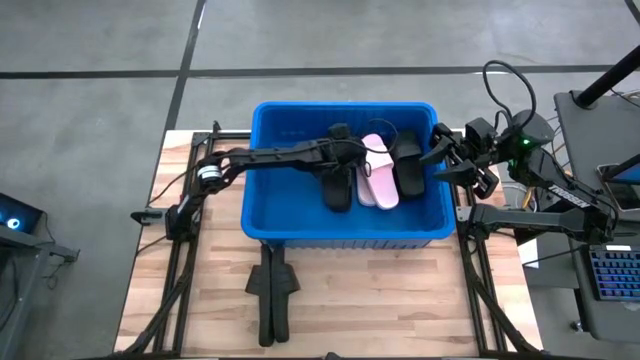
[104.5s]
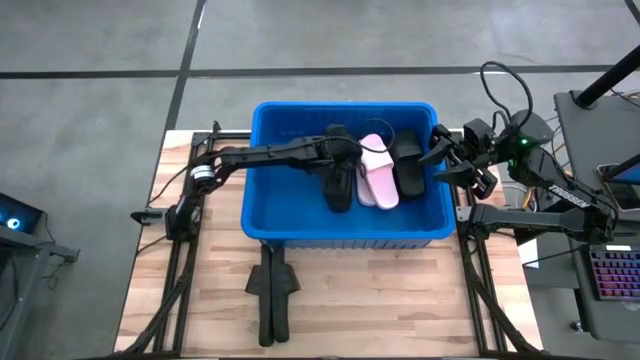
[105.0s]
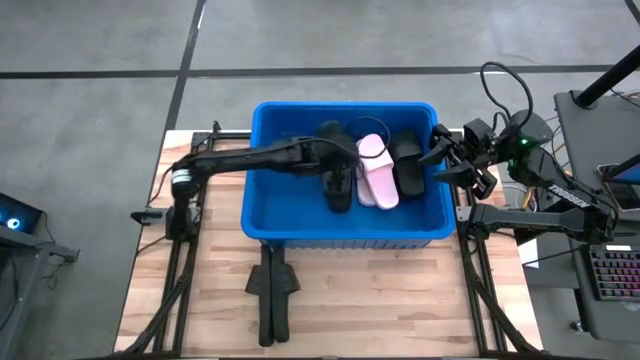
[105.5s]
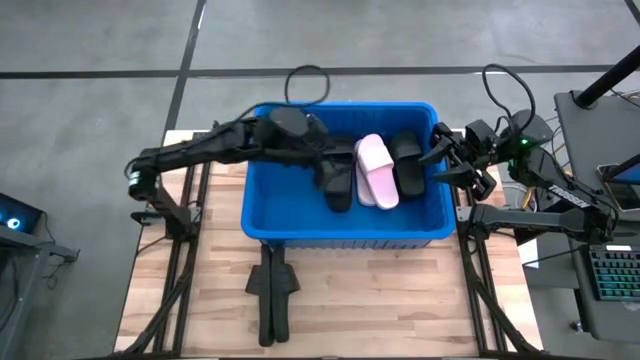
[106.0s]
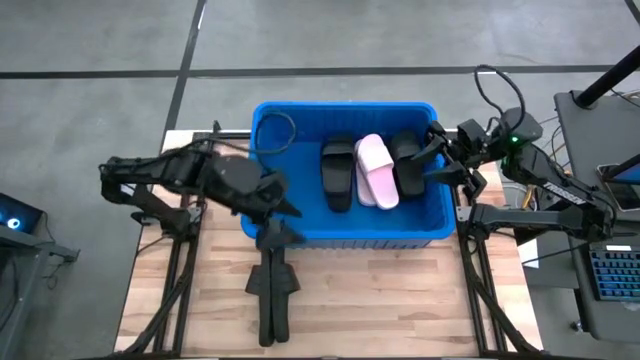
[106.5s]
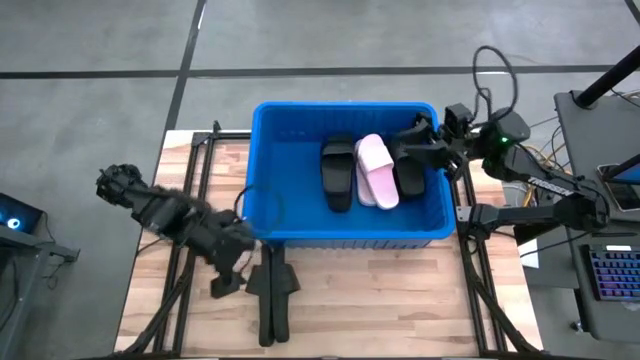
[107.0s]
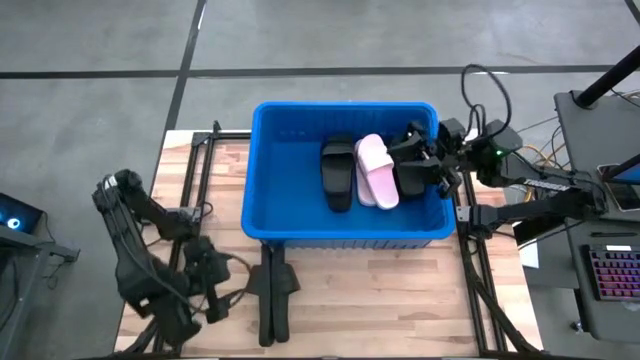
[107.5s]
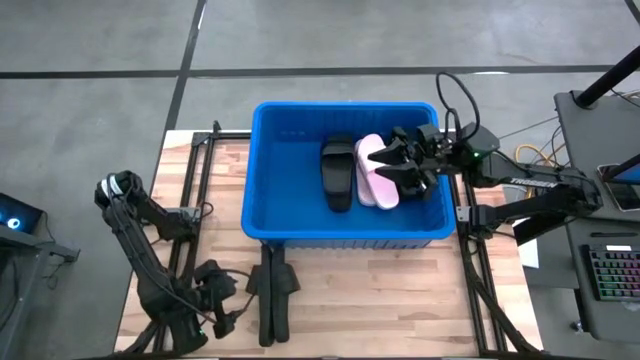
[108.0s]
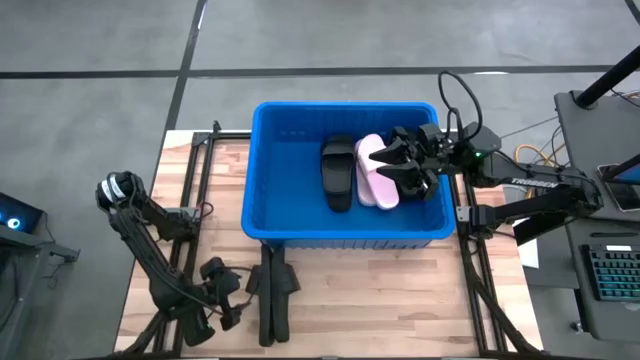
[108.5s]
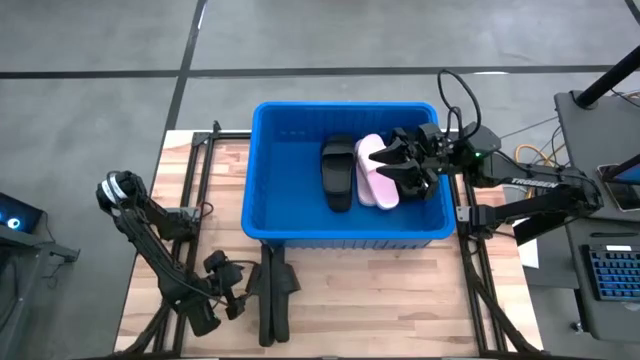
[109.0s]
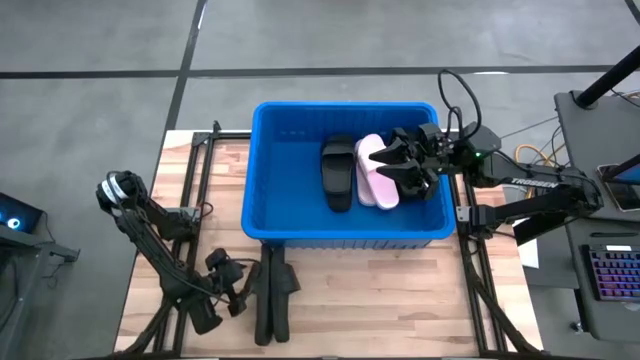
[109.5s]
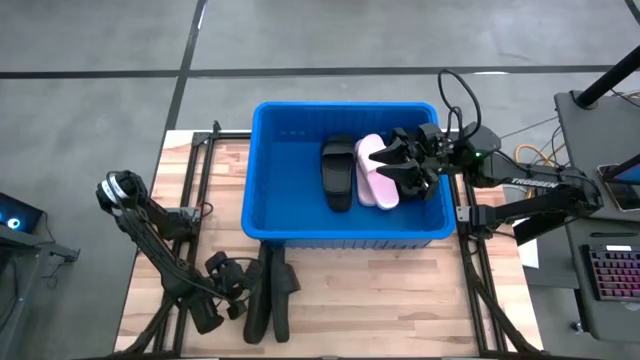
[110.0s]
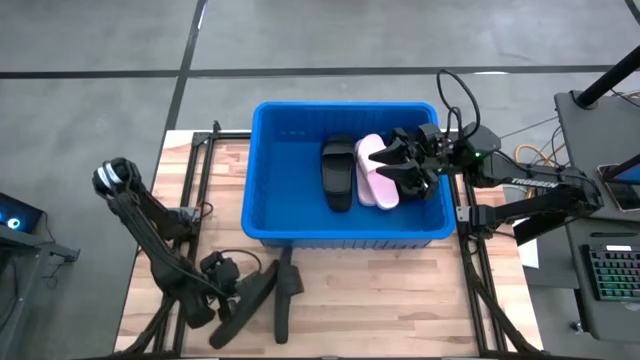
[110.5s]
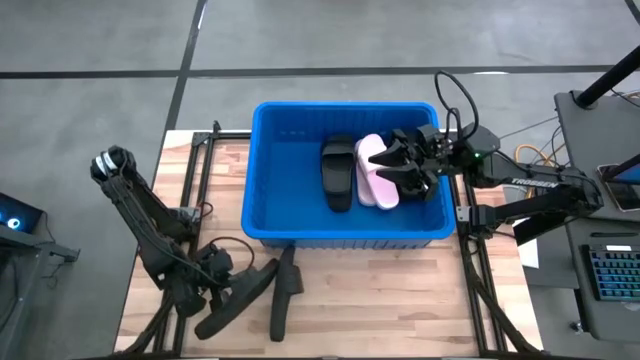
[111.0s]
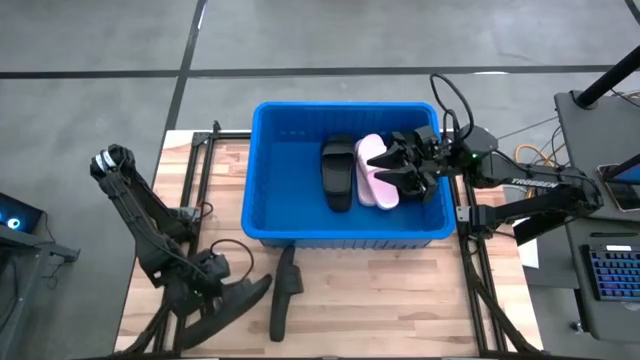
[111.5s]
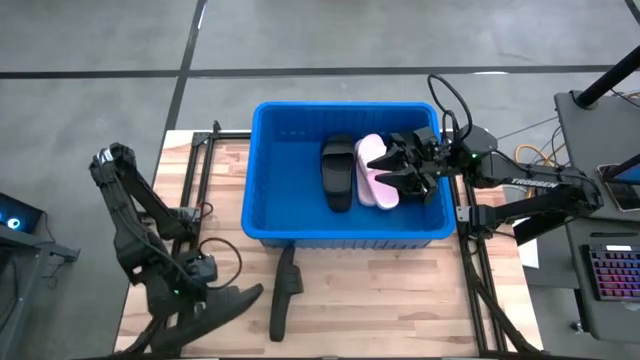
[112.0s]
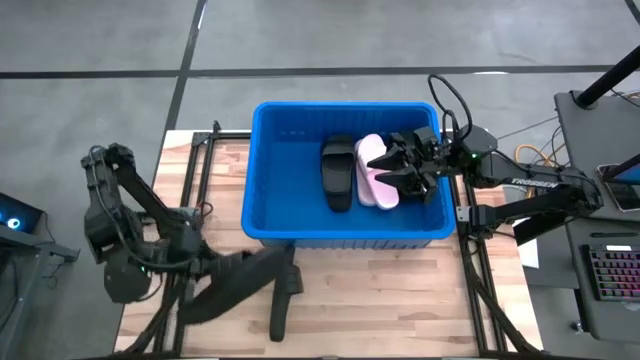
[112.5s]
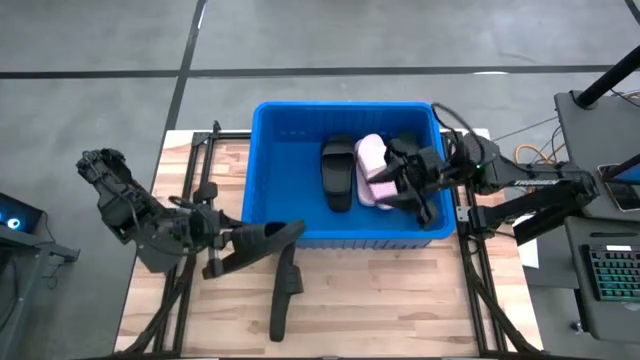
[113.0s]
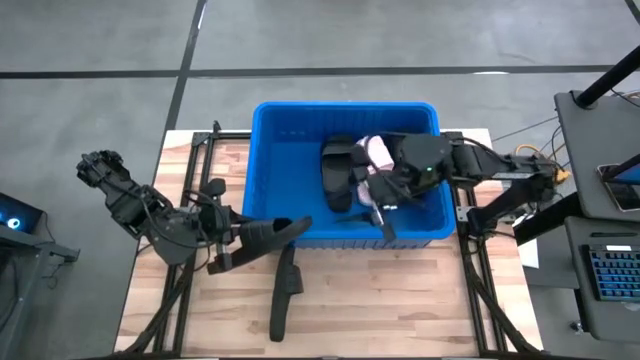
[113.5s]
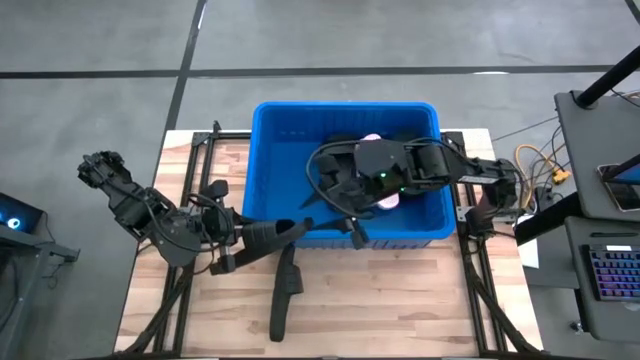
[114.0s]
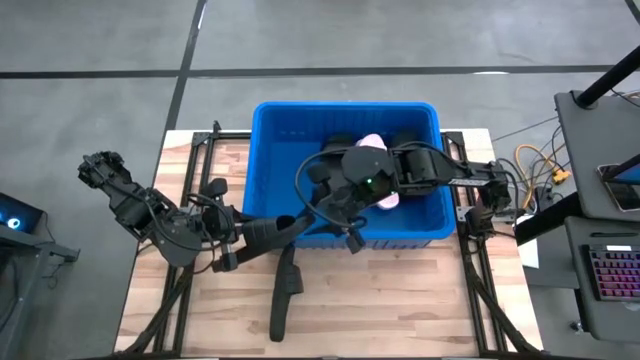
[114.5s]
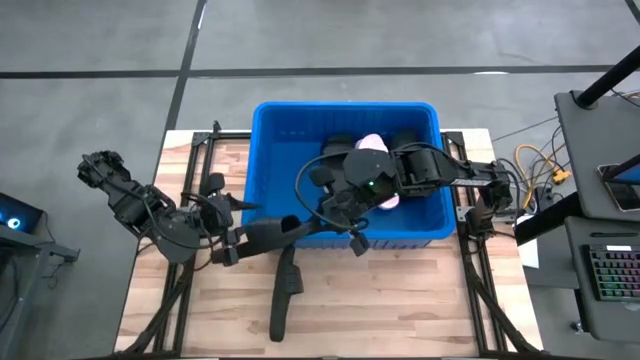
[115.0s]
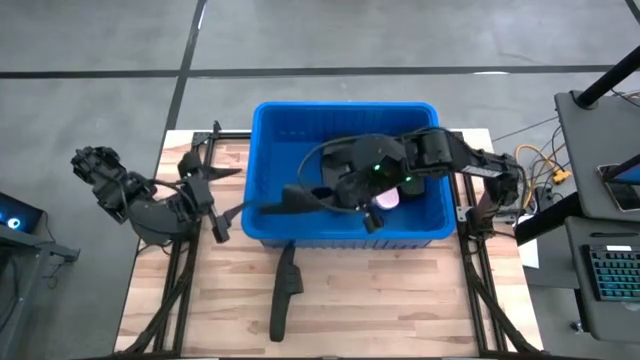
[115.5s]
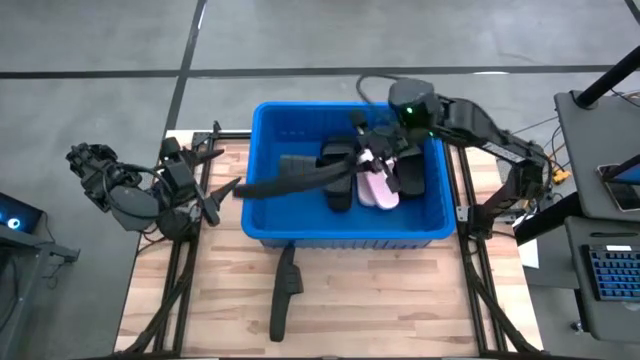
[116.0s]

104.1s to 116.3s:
Task: Pick and place slides into bin
Put the black slide into the blue bin

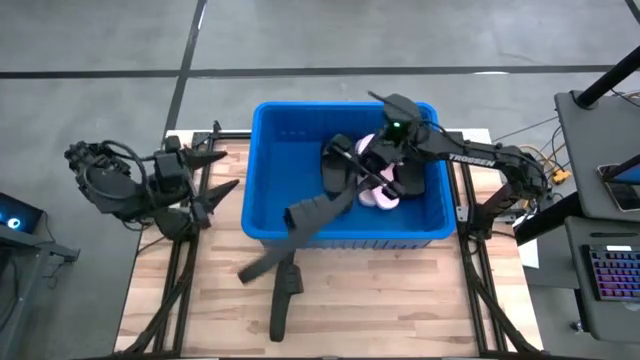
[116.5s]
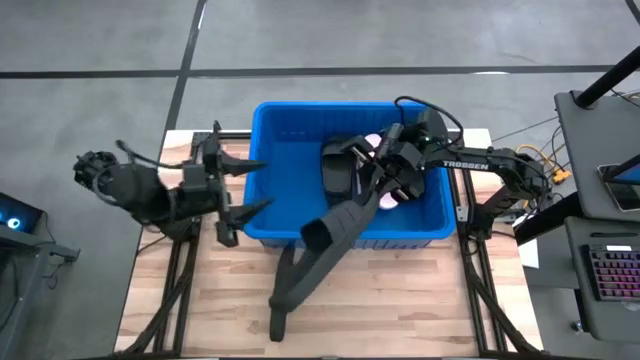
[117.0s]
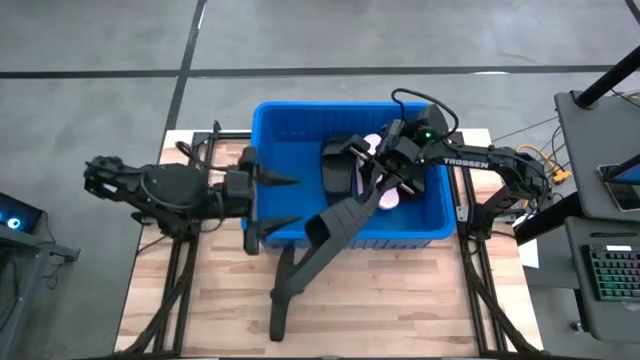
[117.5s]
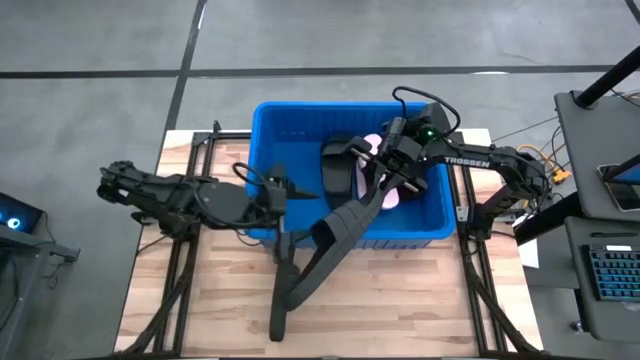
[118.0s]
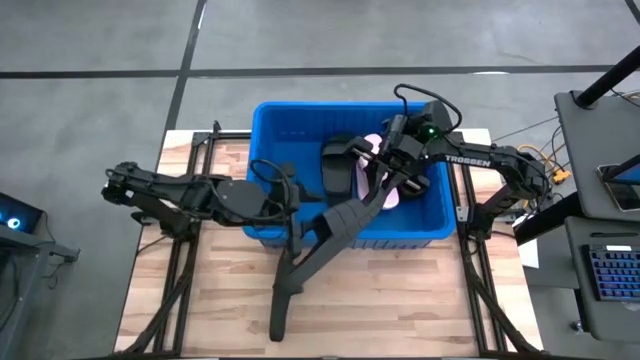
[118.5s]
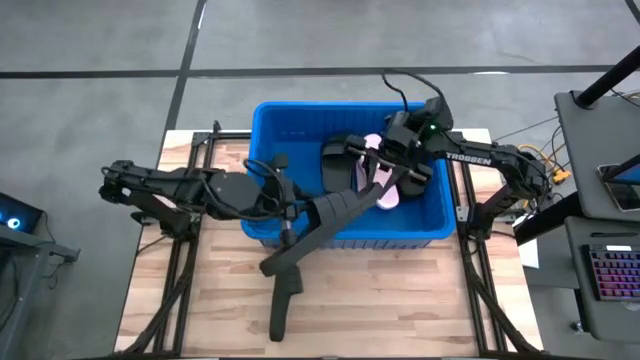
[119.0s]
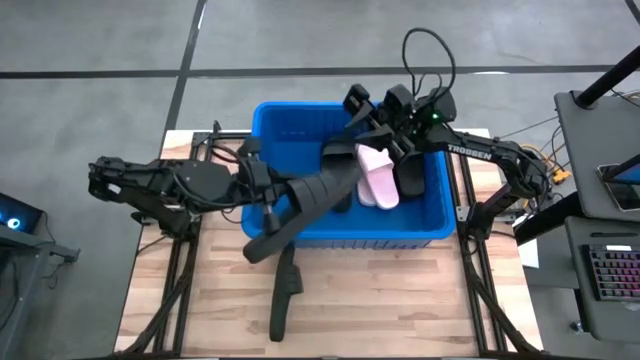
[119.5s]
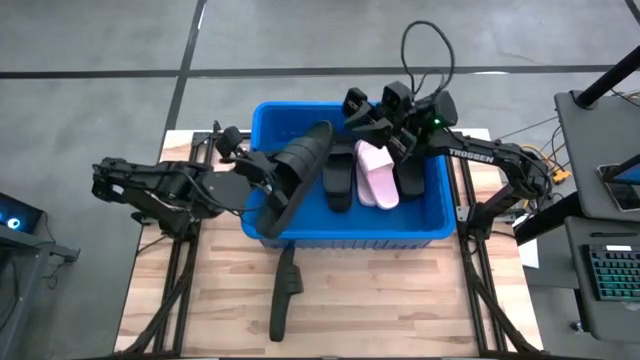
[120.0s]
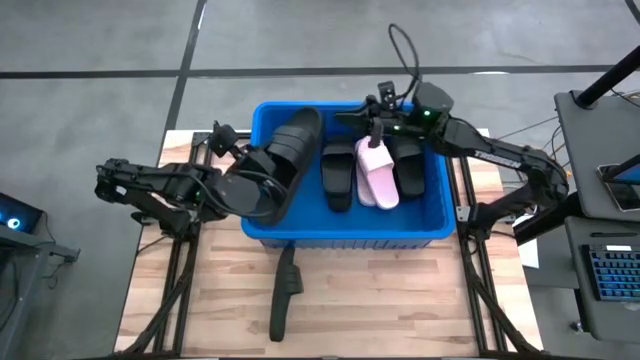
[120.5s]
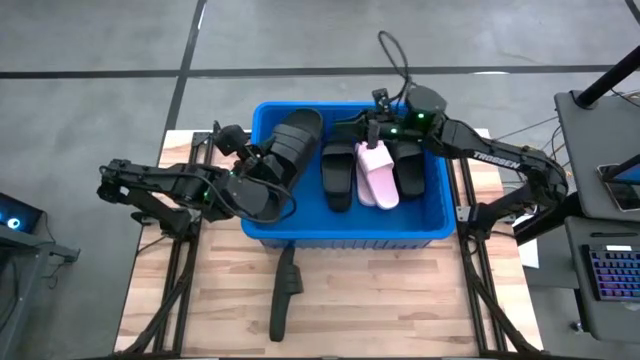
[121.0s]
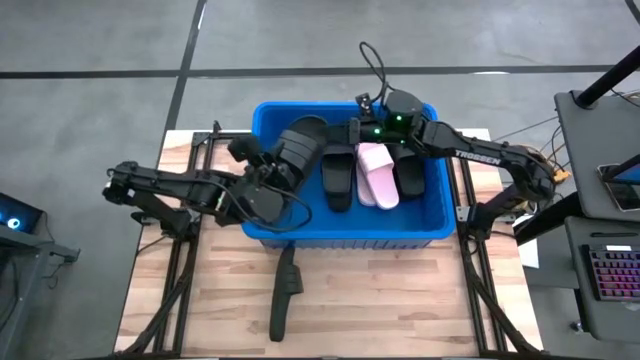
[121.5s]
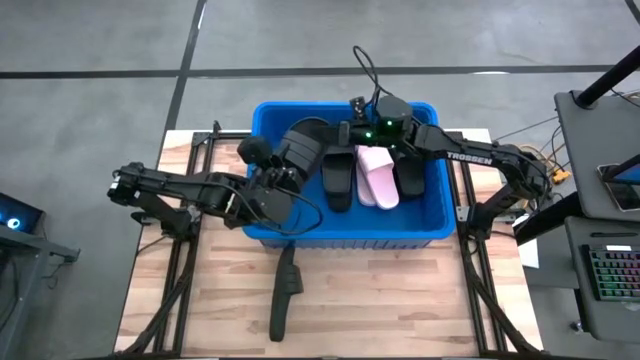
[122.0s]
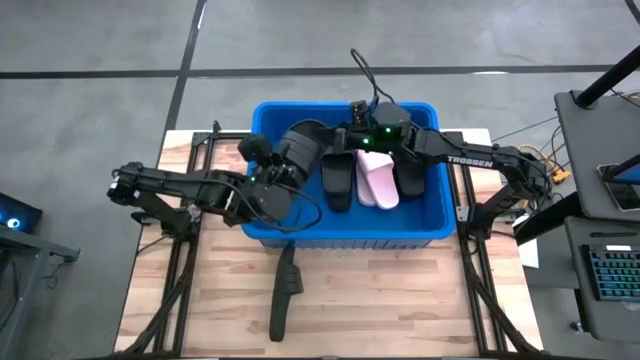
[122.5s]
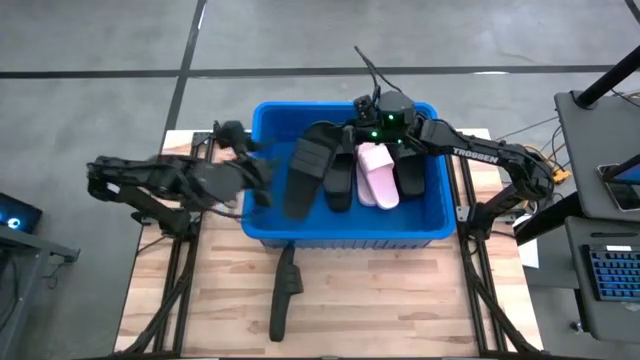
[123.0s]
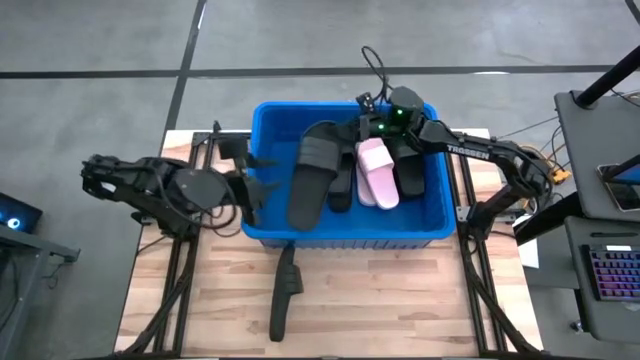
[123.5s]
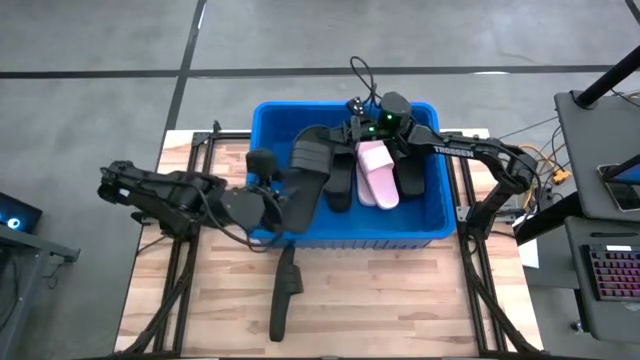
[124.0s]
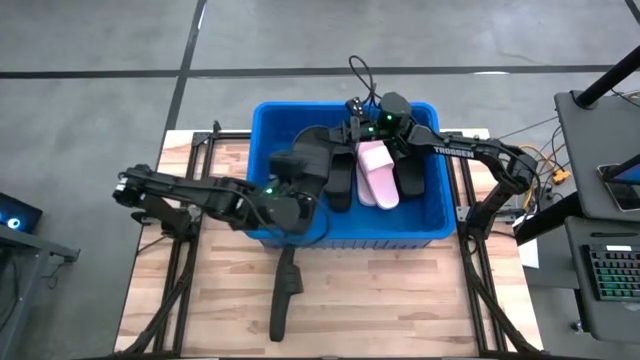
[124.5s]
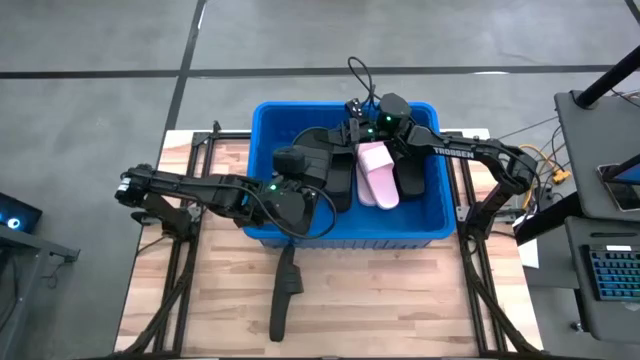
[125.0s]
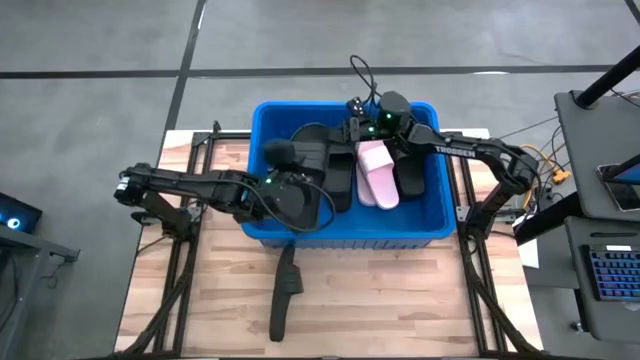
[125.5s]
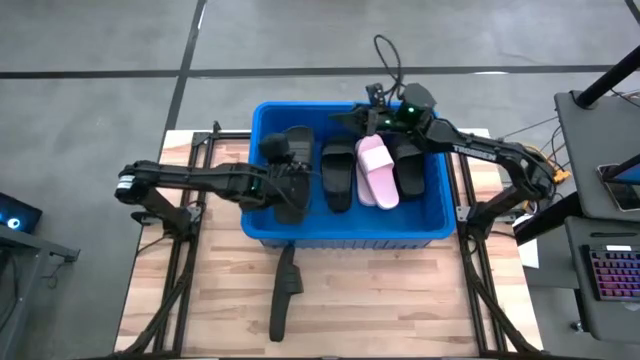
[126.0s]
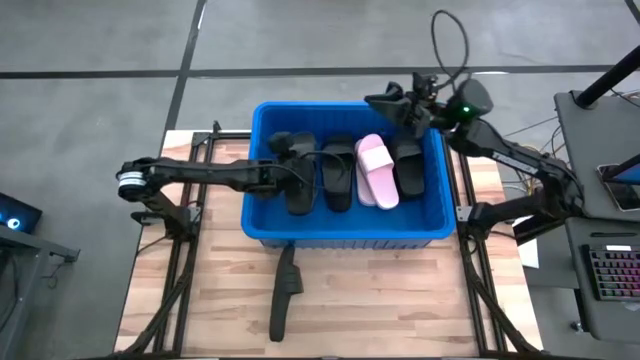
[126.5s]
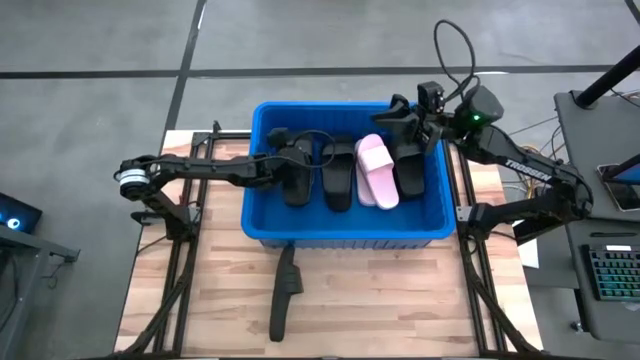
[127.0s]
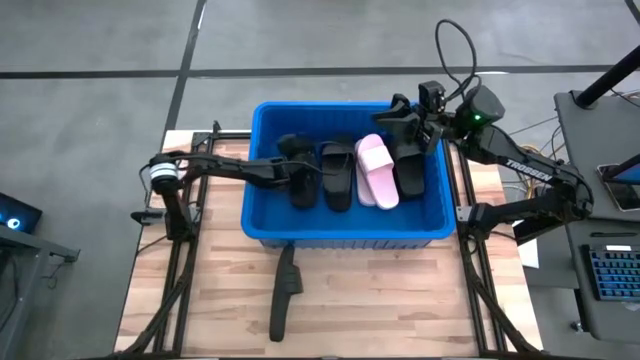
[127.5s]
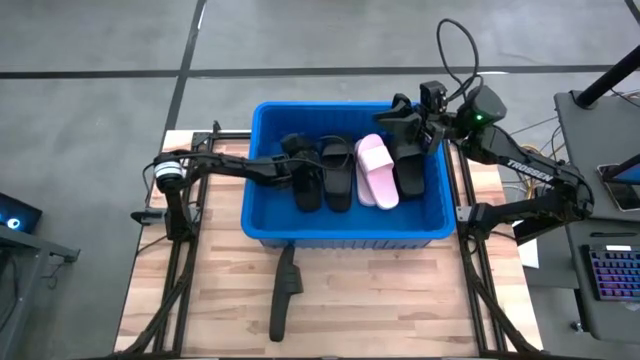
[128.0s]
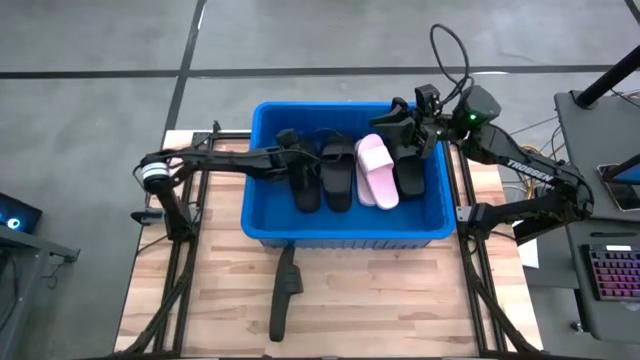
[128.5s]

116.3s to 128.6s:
Put the black slide into the blue bin
